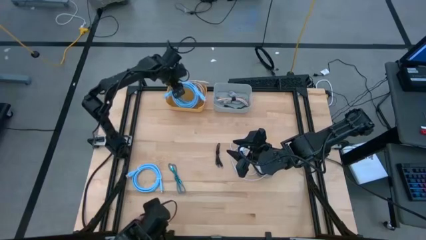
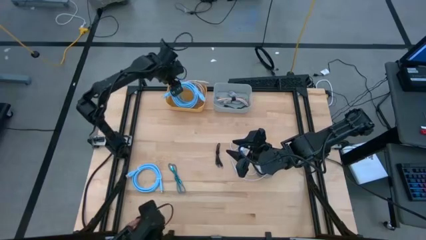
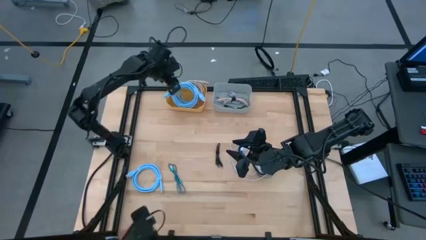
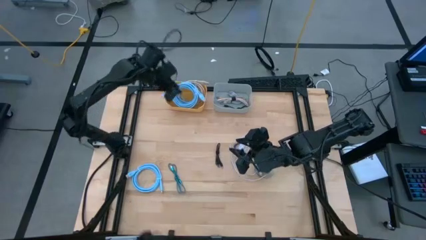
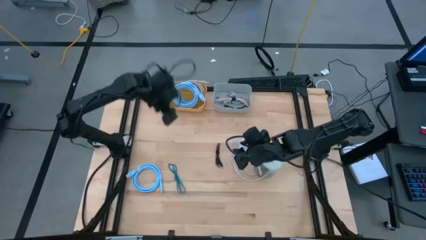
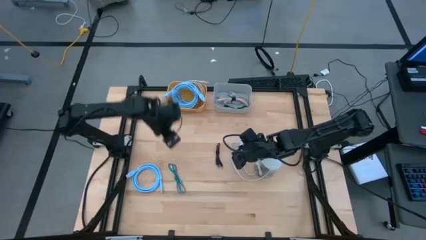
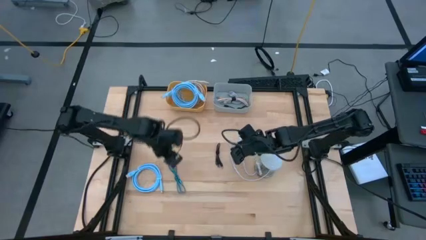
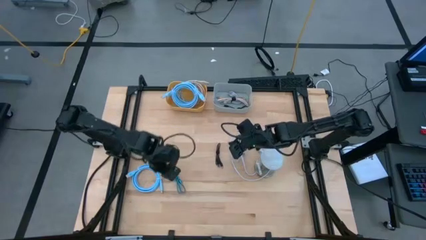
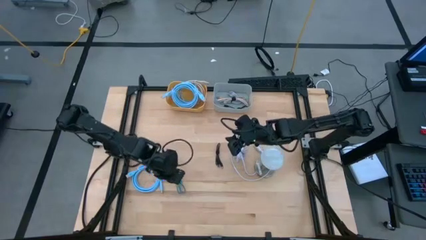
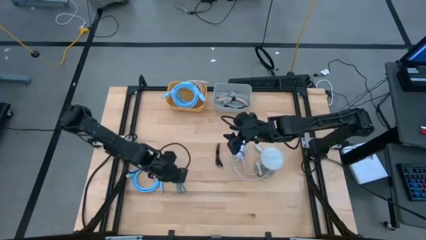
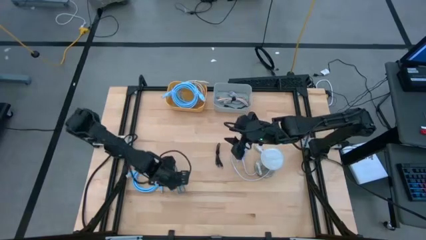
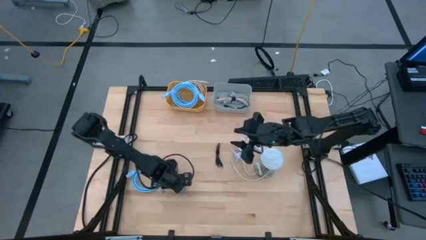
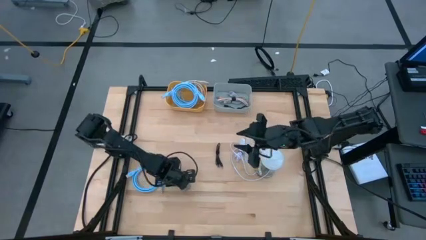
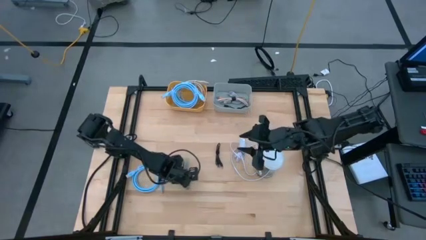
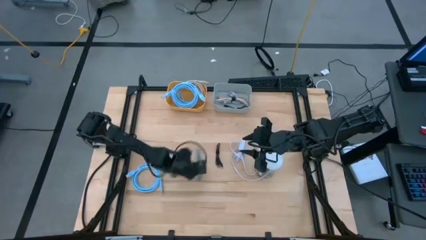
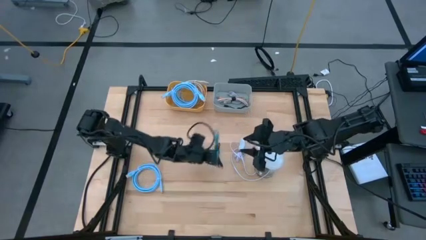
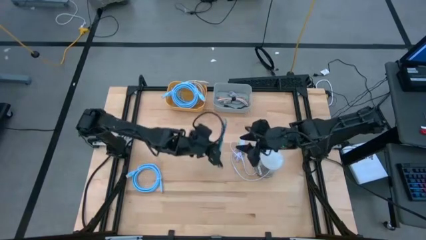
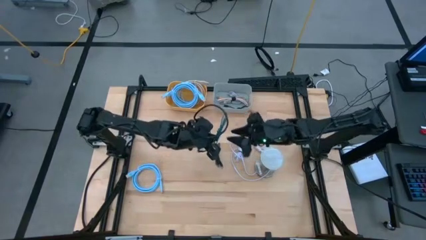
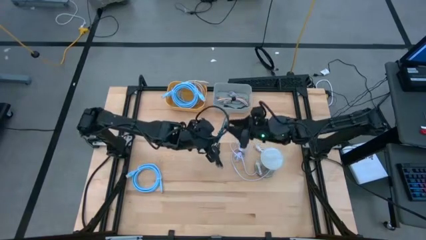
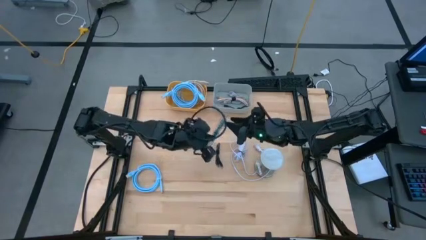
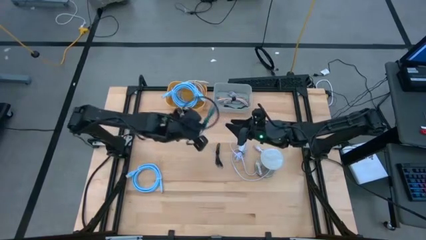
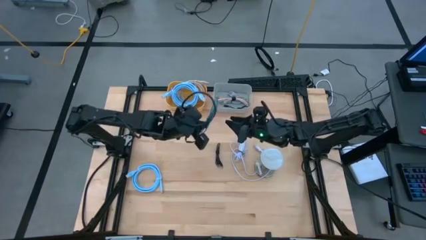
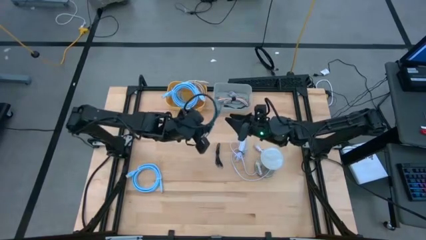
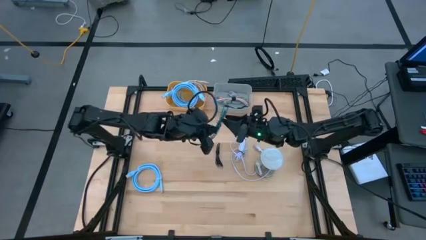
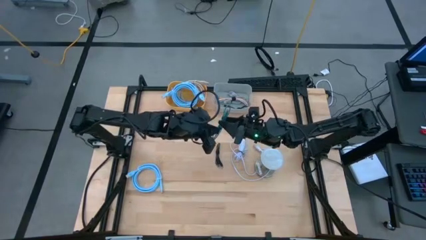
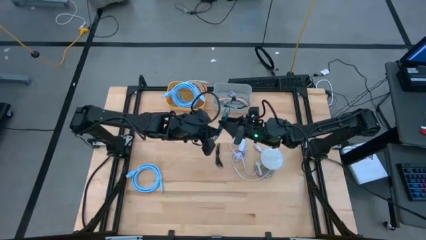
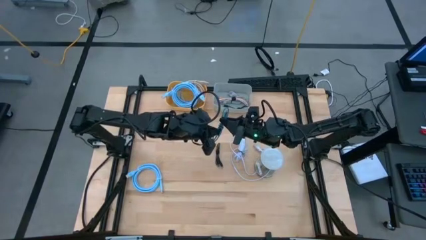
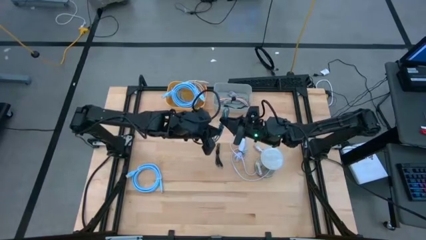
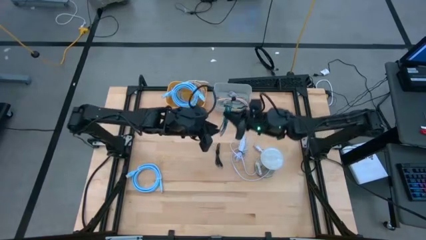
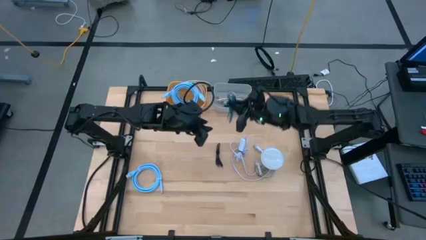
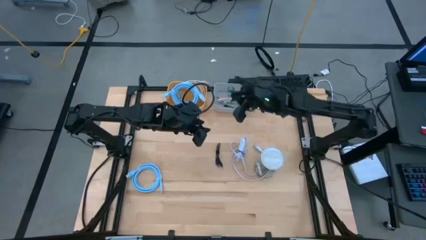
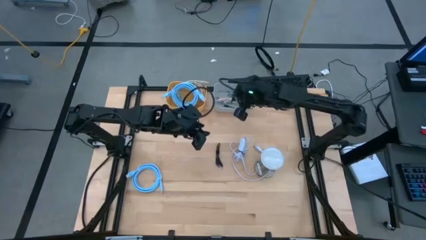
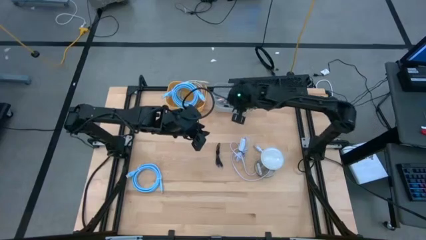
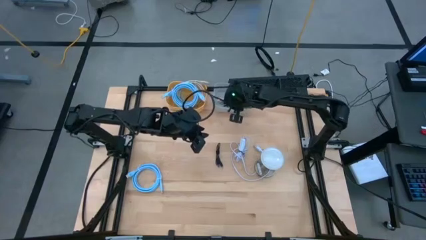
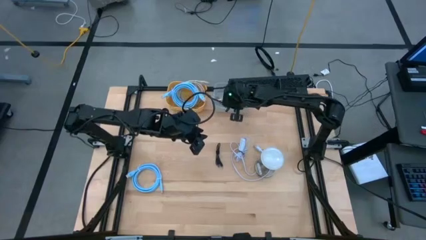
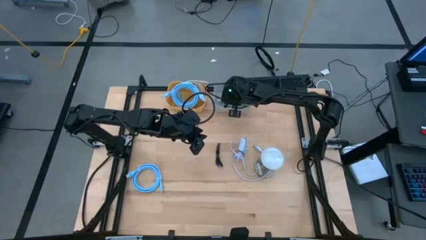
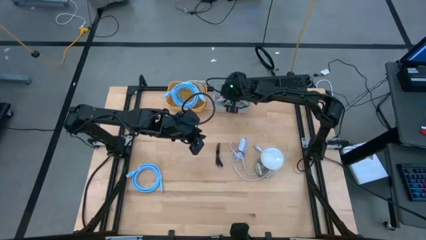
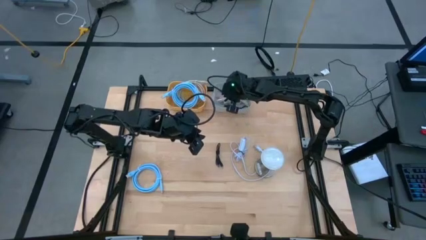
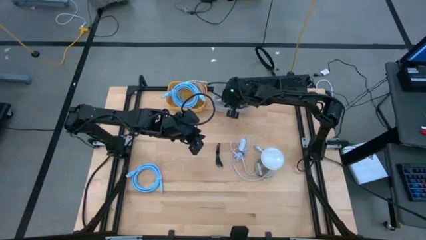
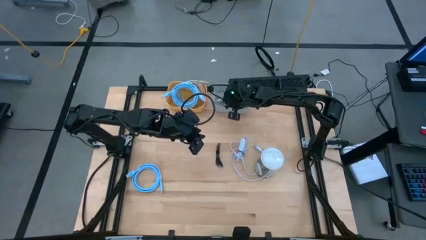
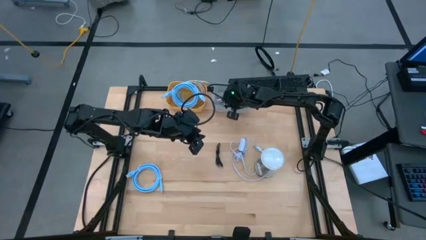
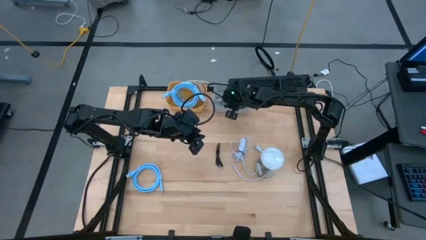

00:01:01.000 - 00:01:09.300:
Task: Pick & Place USB Port
Put the blue and black charger cable into the gray bin

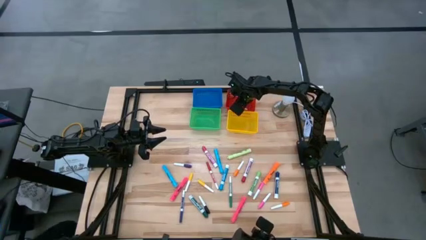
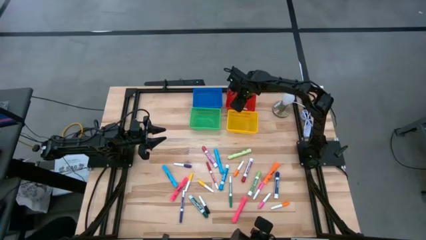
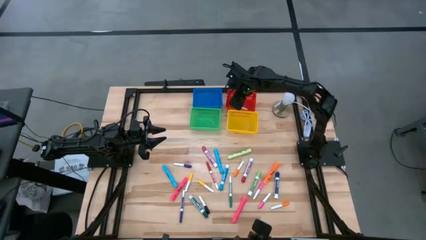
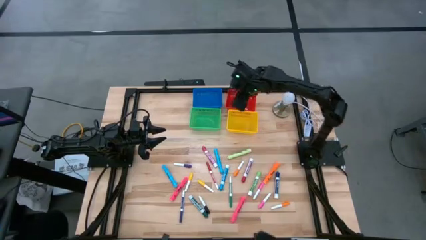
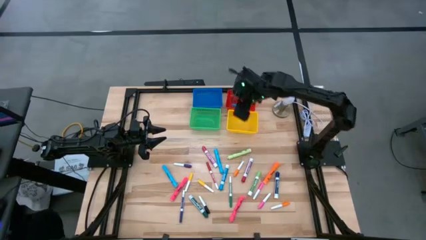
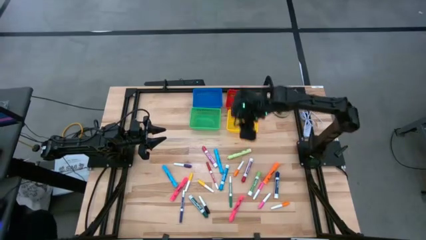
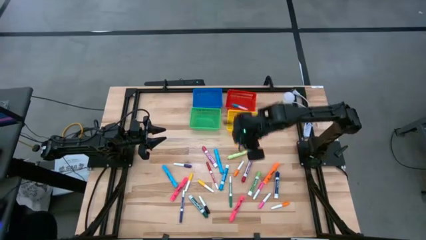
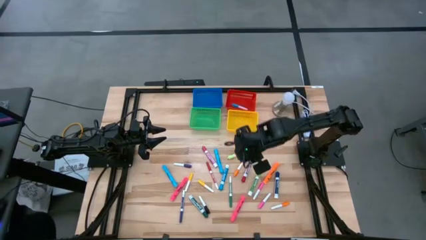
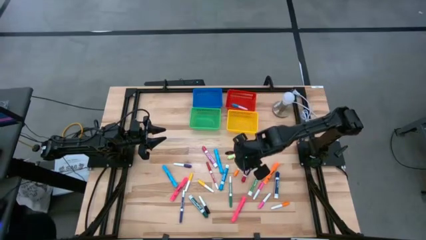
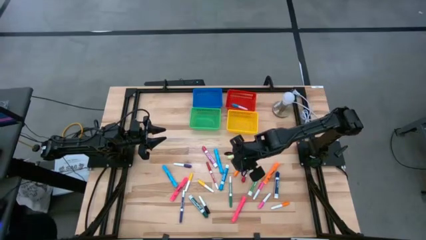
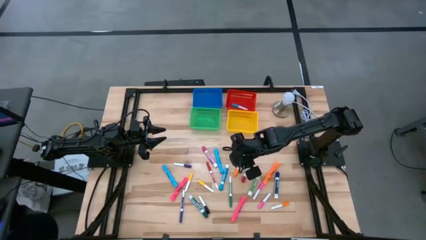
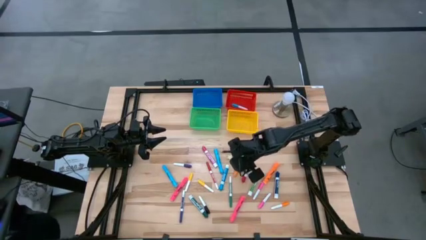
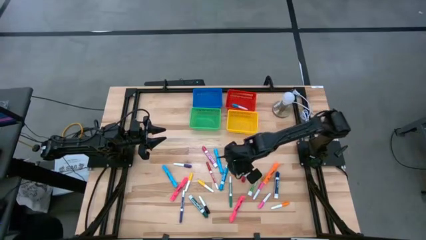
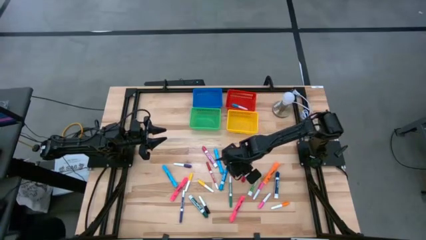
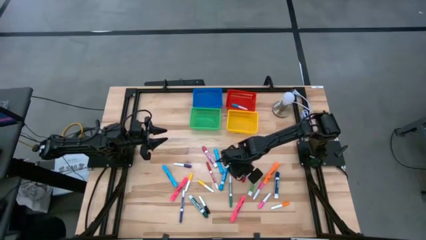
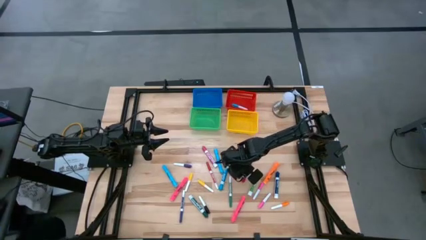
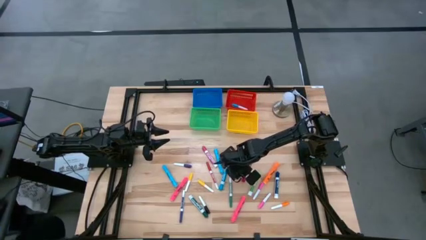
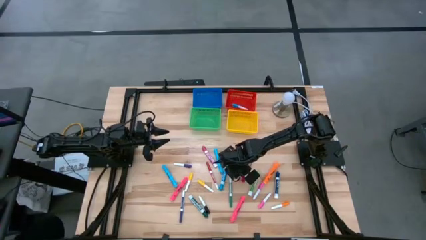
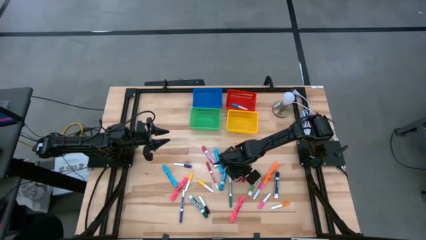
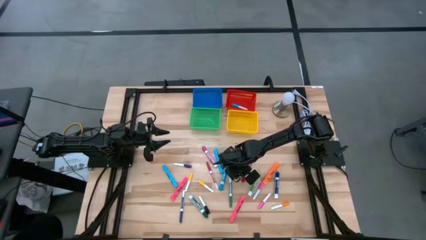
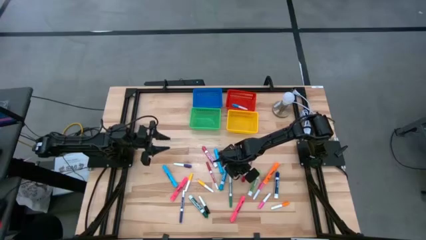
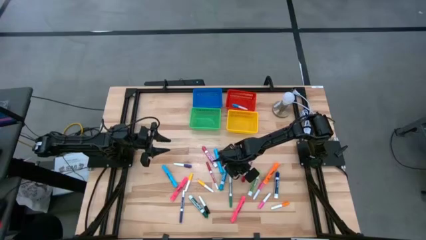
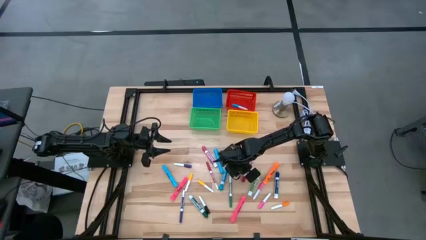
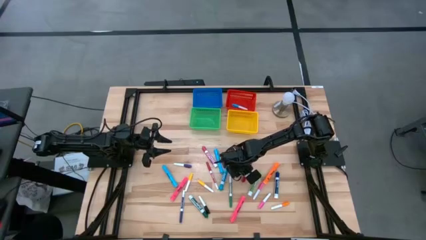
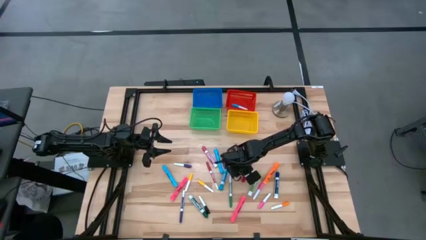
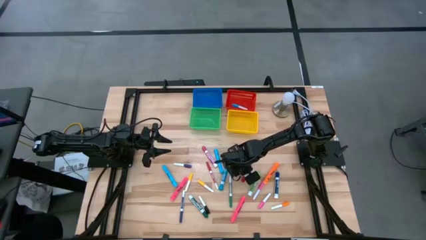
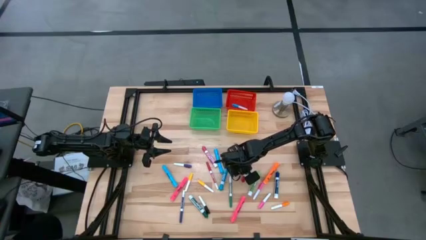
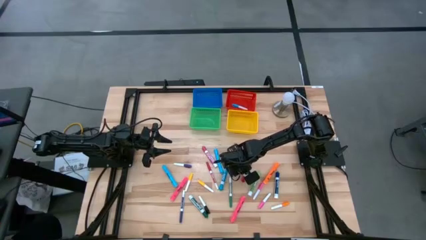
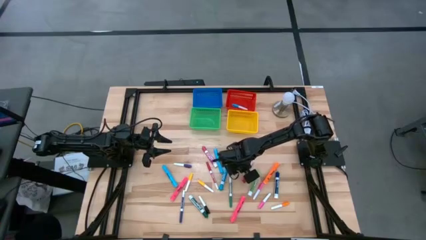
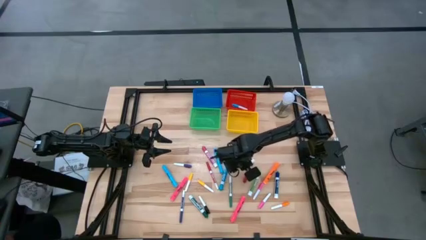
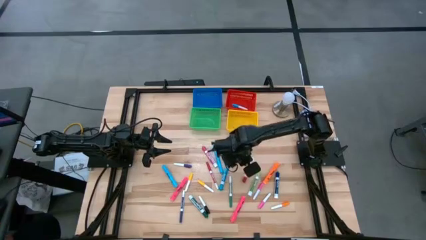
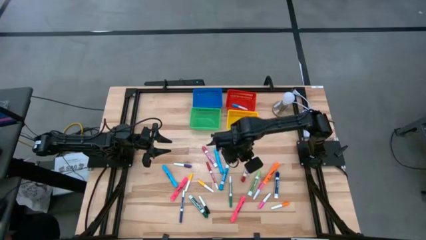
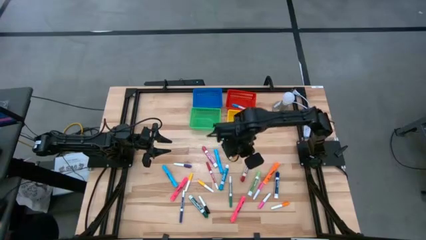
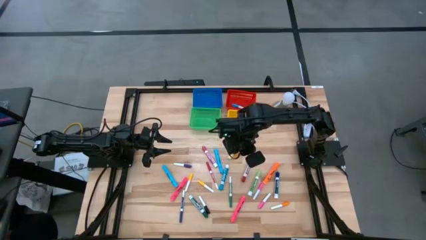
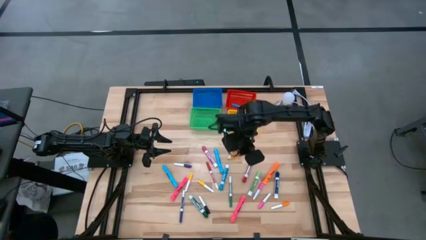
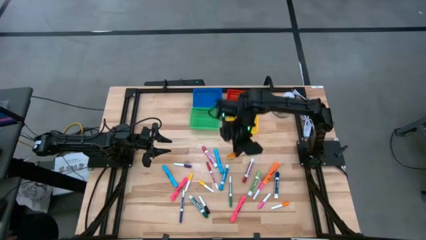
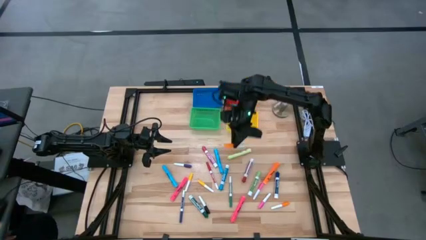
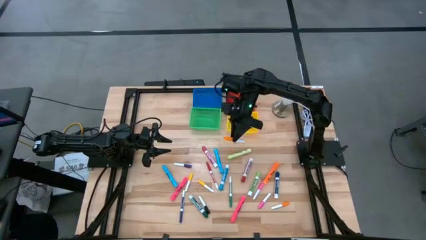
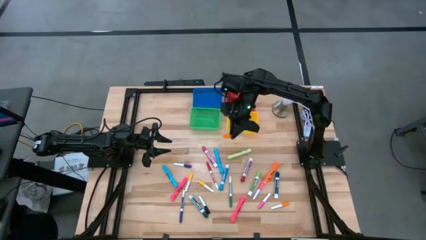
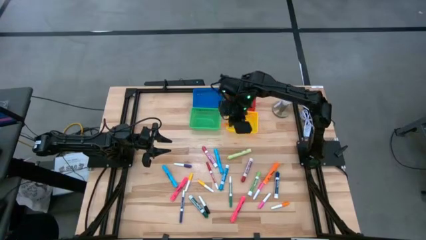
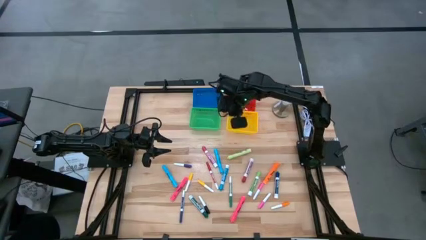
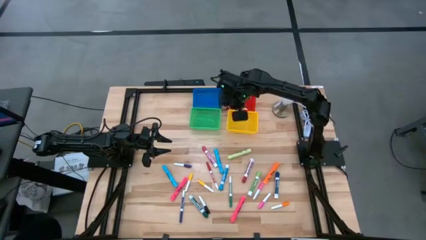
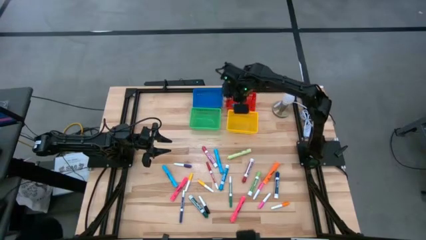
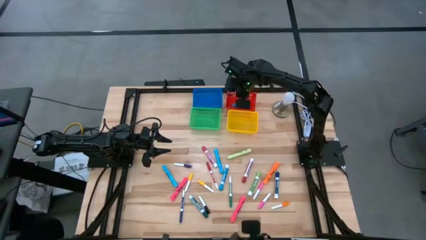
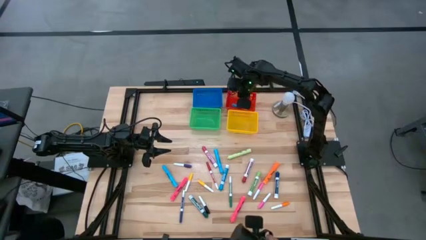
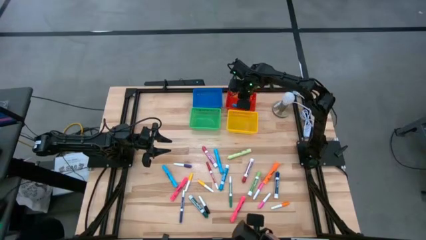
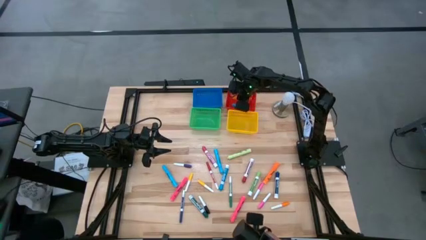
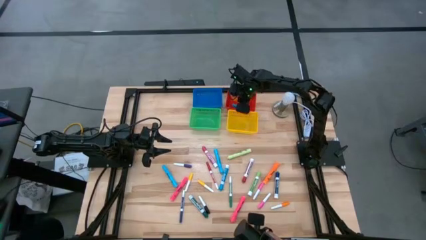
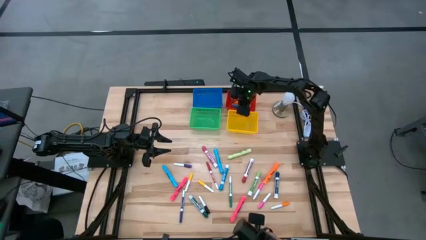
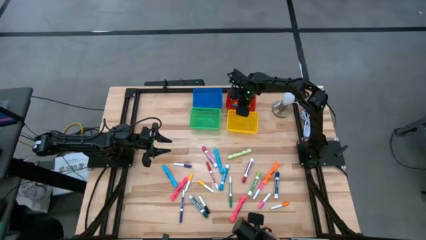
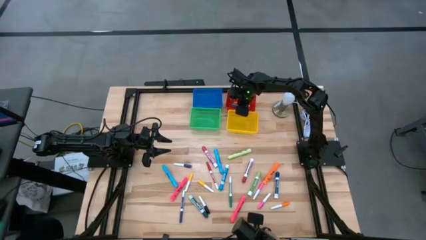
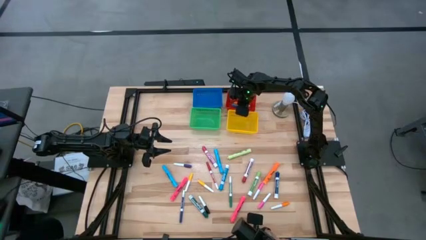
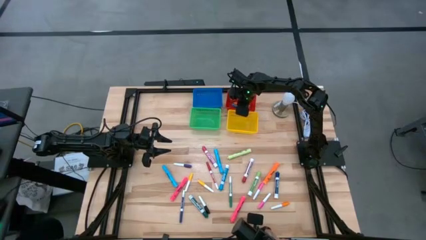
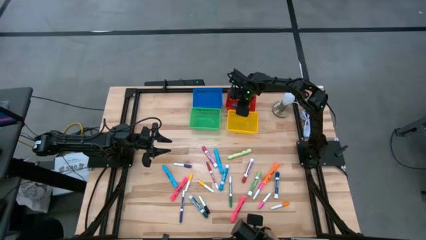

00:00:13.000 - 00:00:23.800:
Task: Pick & Place Markers
Put the top orange pen into the red basket
